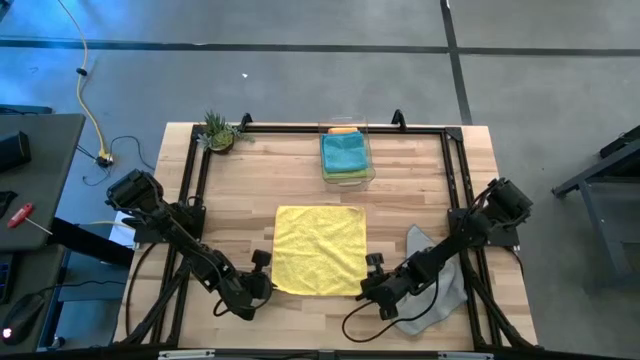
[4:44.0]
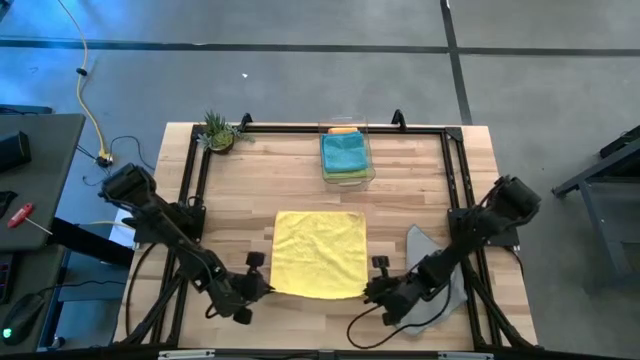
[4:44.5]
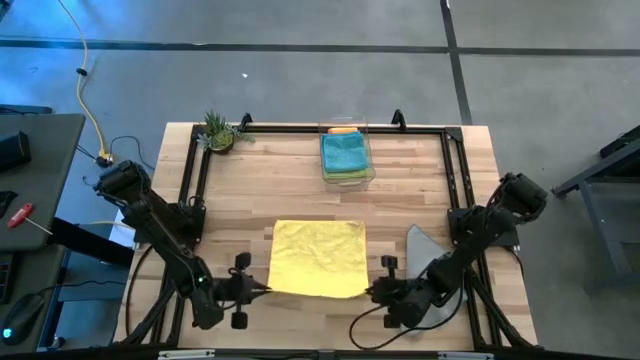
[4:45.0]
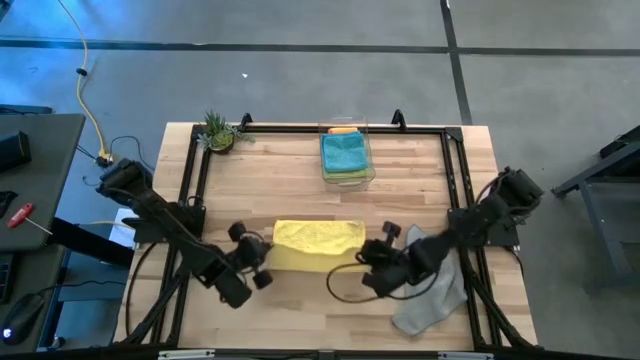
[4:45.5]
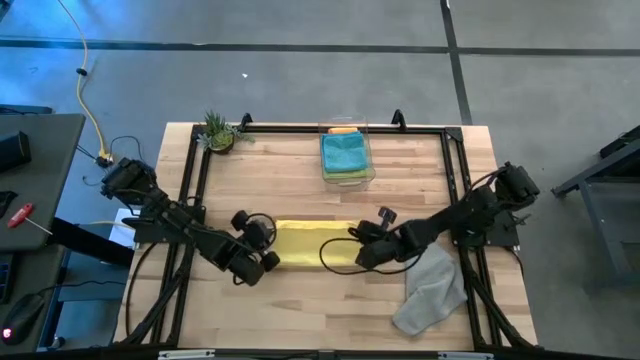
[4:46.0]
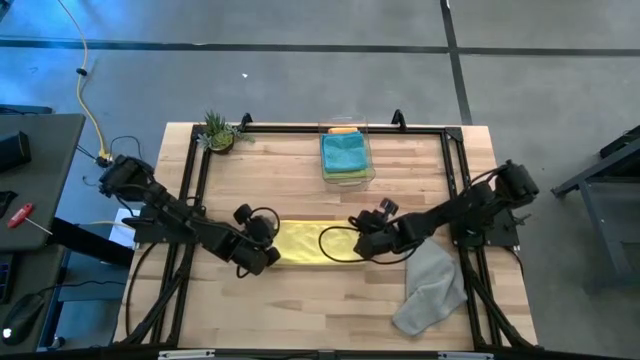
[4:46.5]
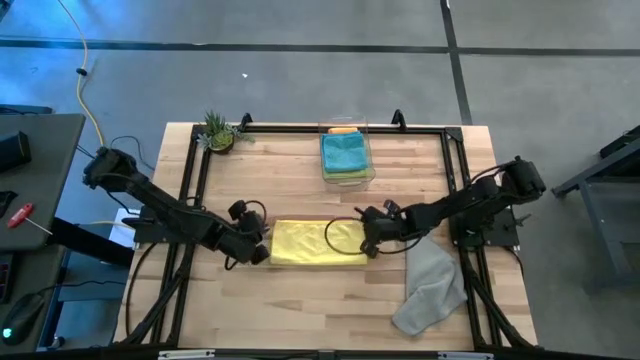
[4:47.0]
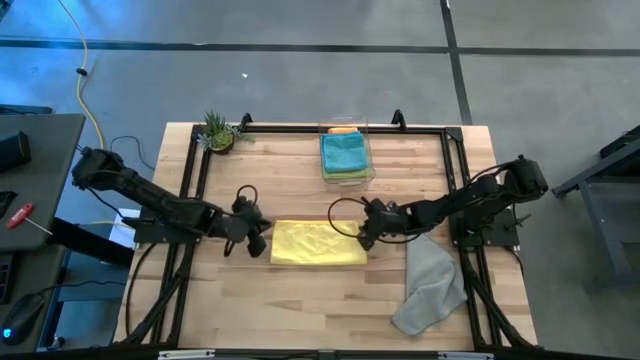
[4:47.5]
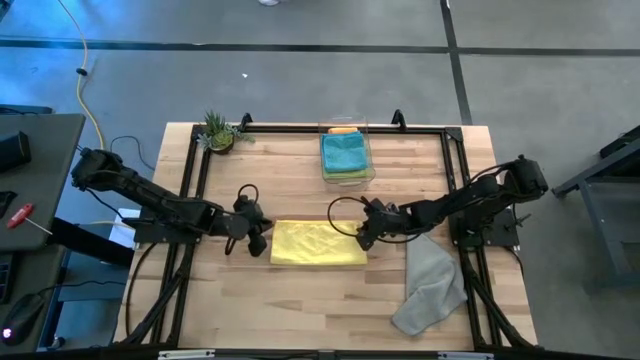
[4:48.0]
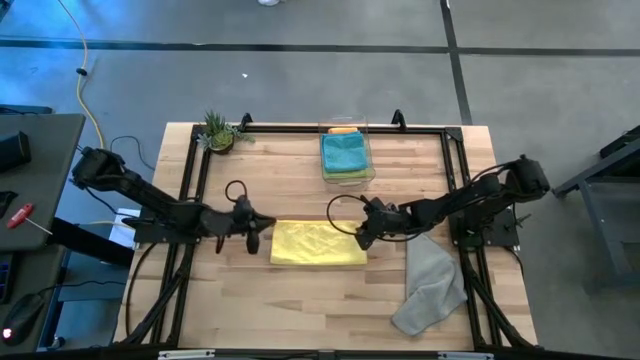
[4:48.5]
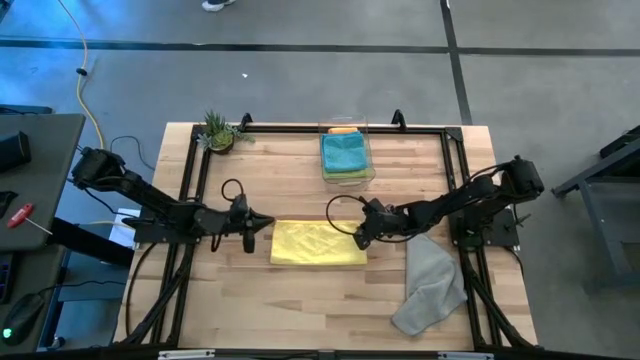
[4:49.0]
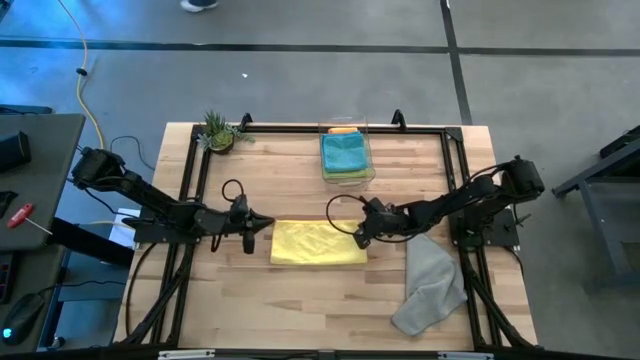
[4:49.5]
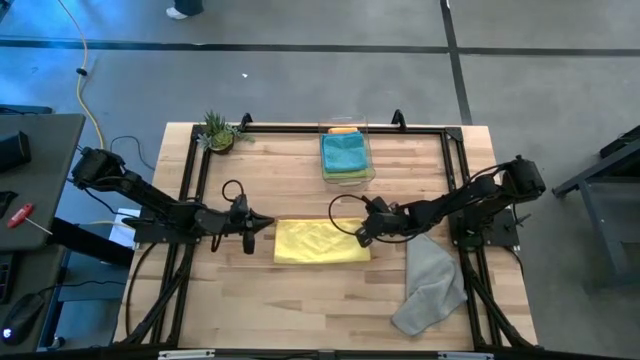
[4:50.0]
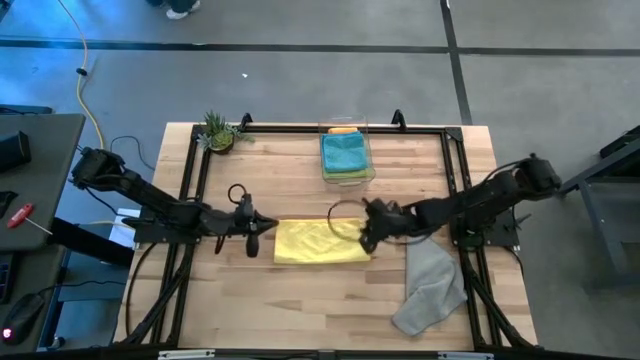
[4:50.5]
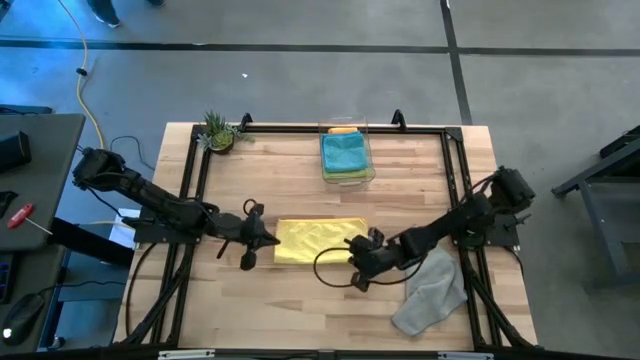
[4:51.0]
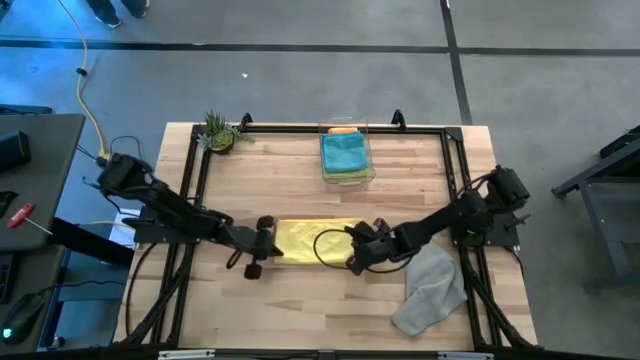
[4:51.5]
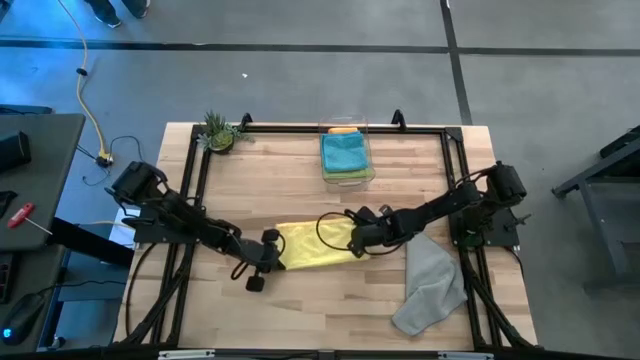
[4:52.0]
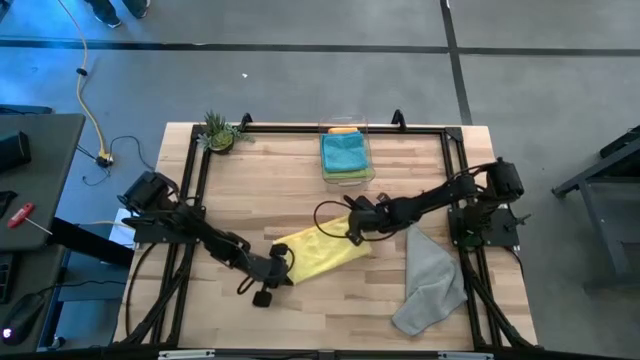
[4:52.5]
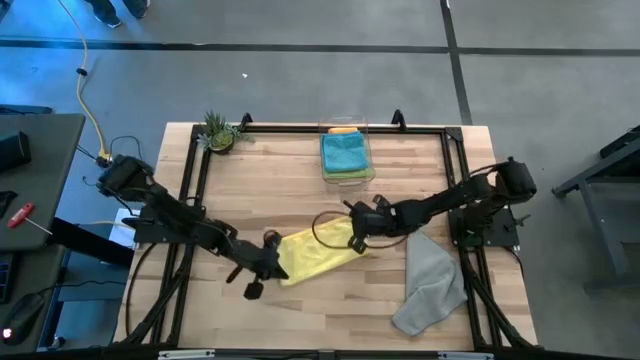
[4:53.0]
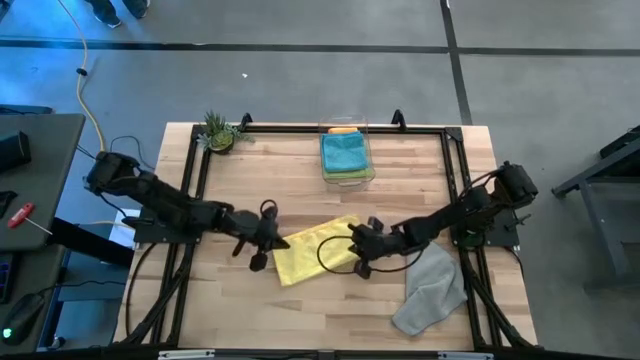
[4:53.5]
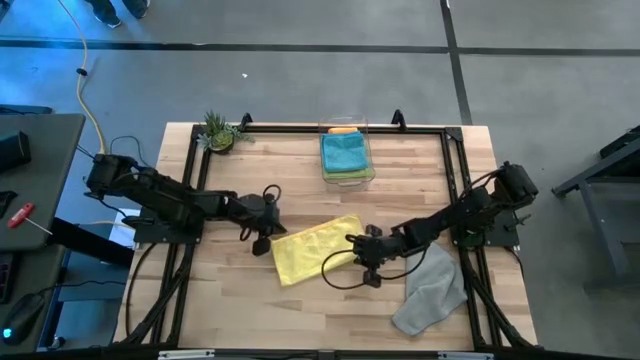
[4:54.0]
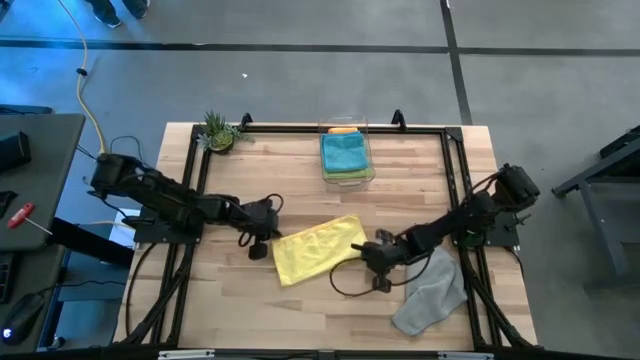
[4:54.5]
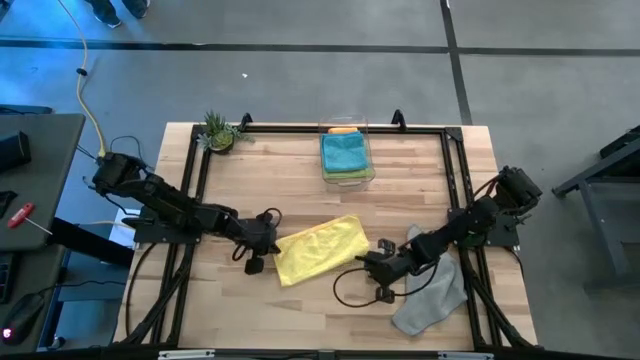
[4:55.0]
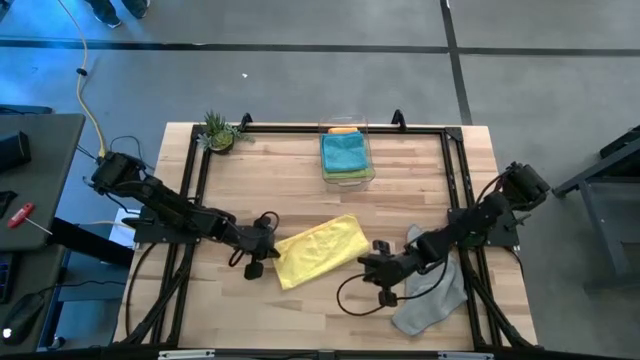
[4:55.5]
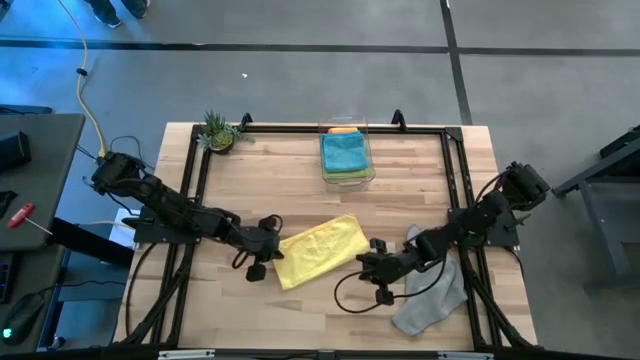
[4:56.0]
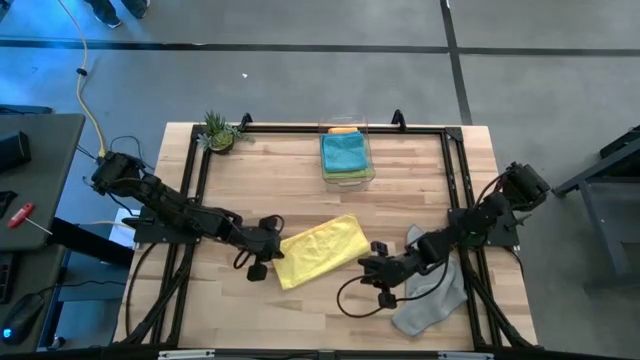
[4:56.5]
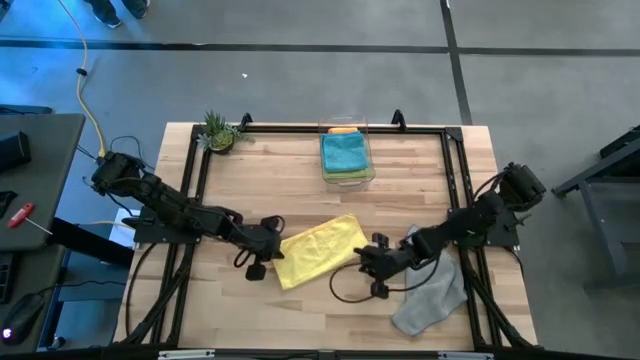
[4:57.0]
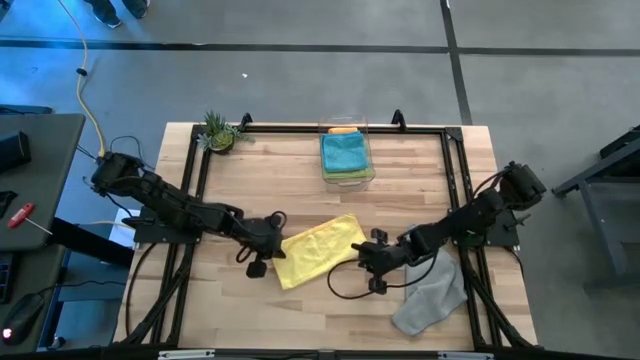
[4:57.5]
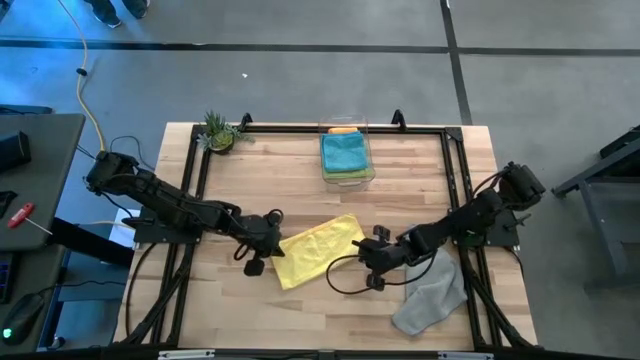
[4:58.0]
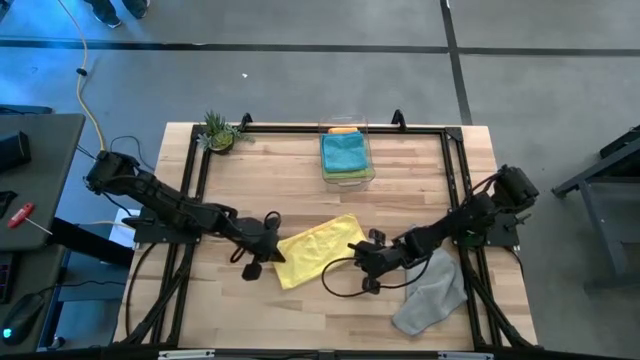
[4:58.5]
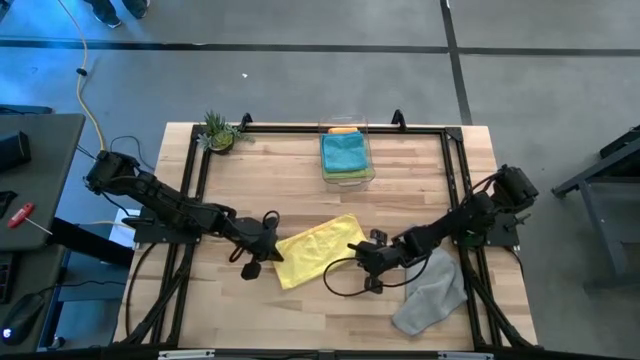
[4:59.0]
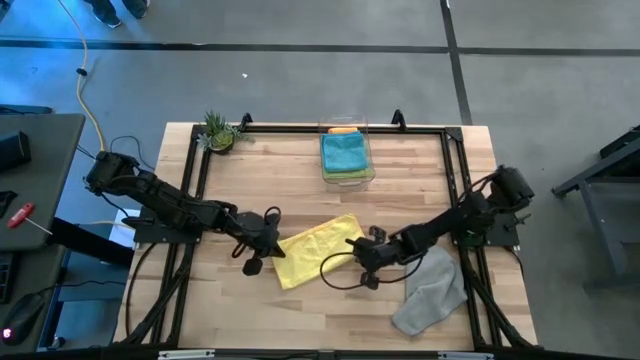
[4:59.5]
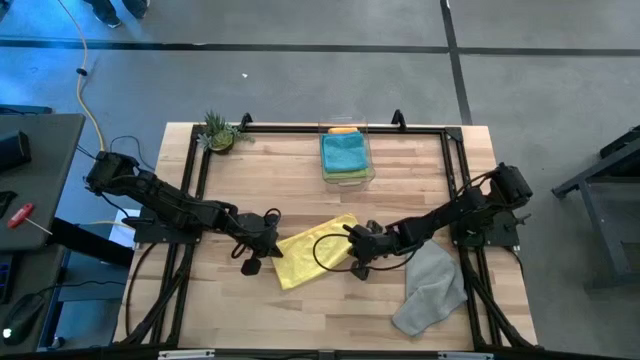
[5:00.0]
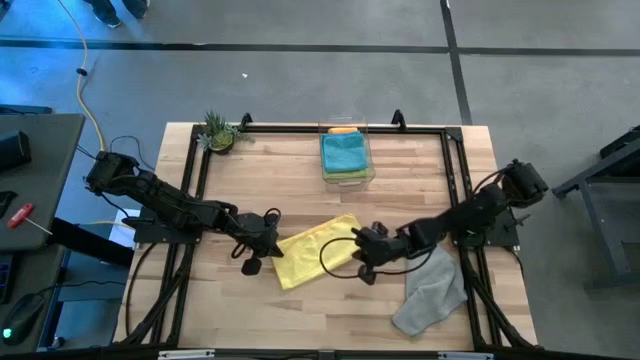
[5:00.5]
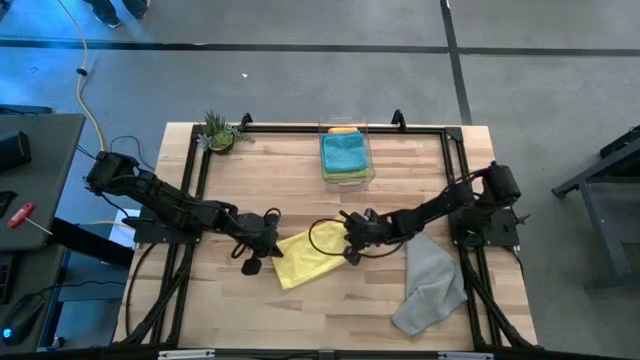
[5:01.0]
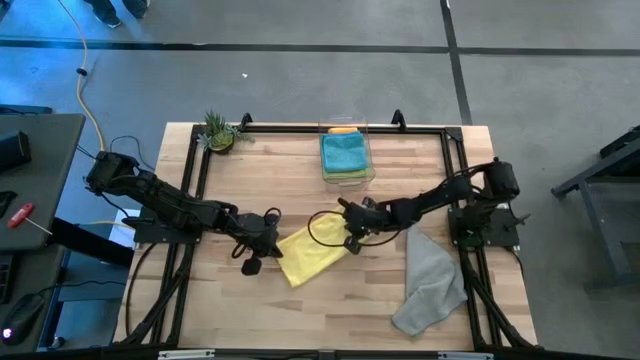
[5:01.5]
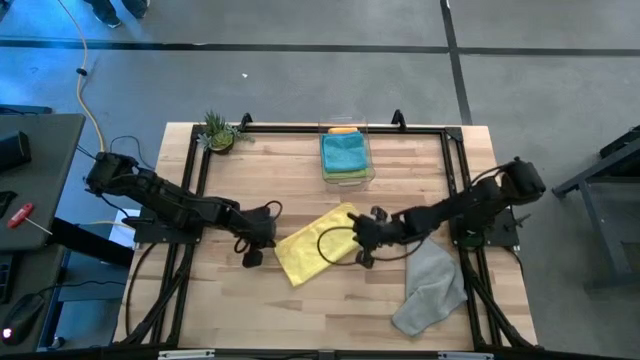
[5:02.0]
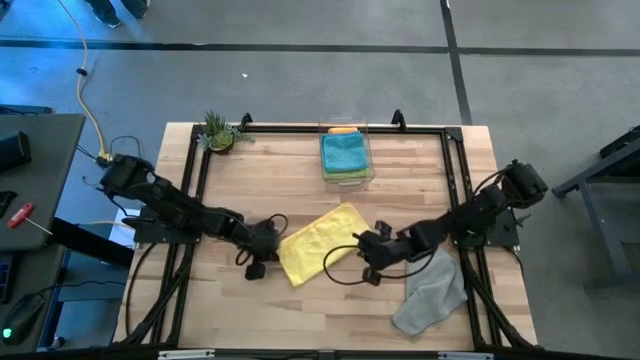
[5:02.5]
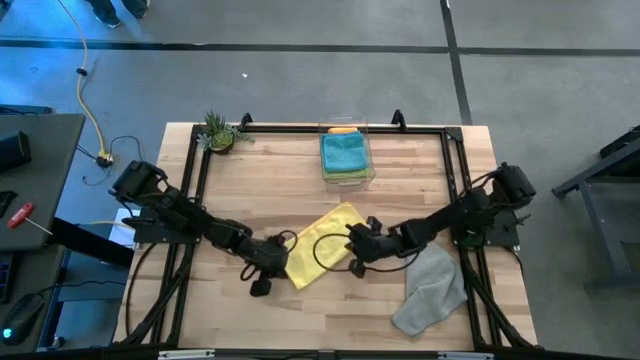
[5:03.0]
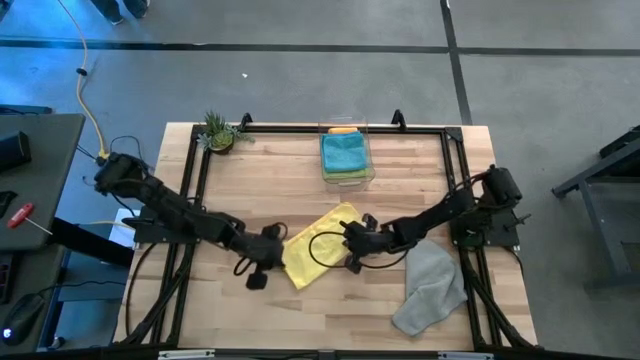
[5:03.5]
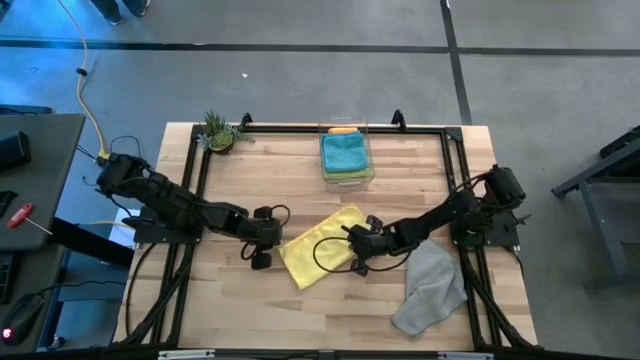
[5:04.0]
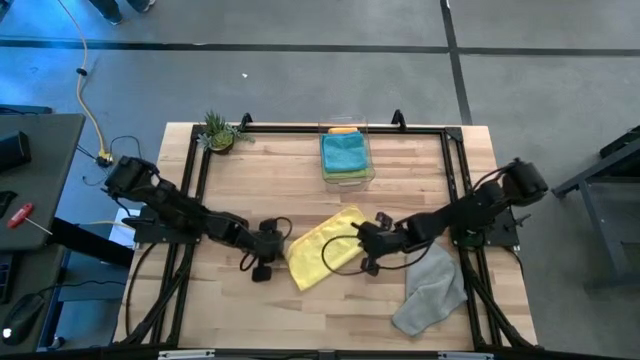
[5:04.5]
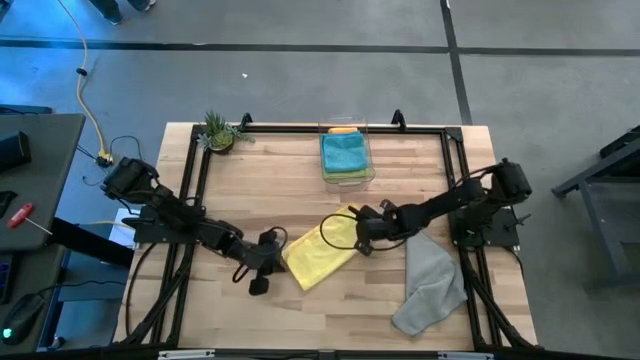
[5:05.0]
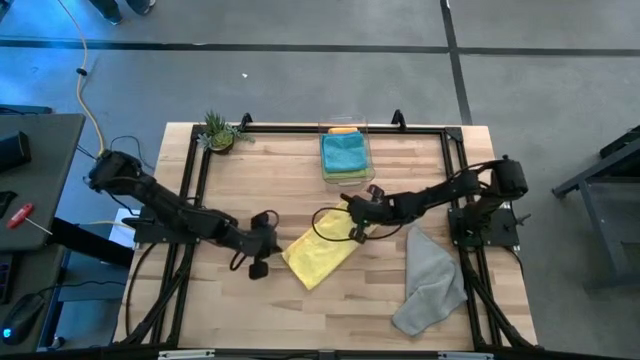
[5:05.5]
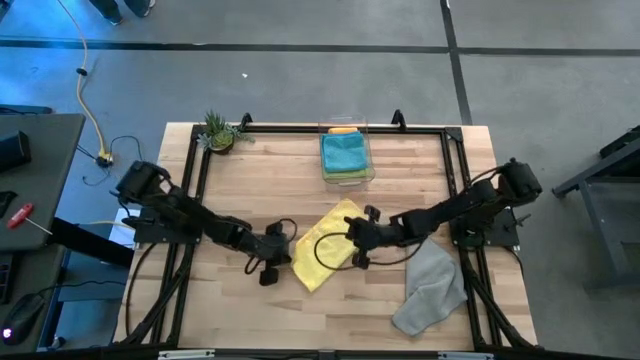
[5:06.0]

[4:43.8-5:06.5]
Task: Fold microfiber towels
Fold the yellow microfiber cloth
